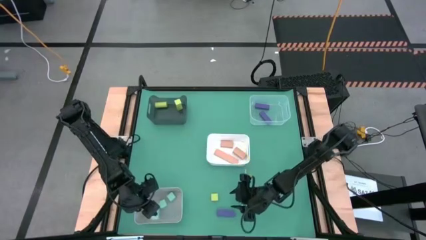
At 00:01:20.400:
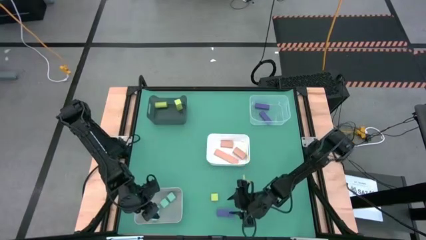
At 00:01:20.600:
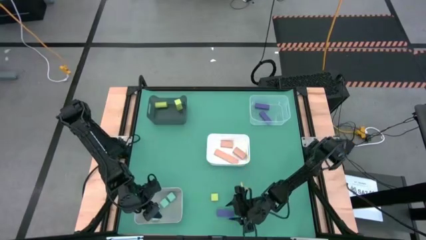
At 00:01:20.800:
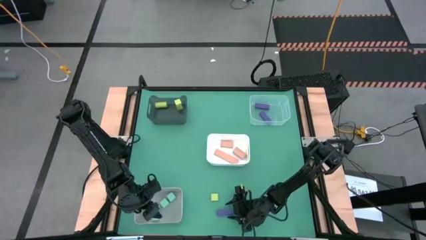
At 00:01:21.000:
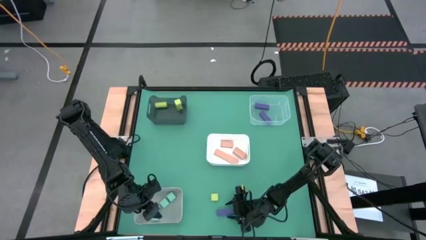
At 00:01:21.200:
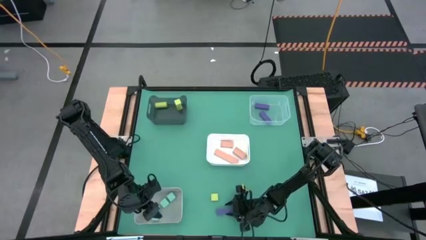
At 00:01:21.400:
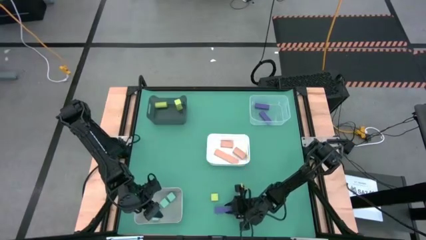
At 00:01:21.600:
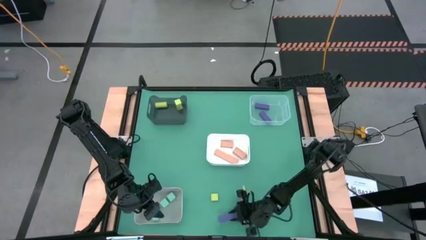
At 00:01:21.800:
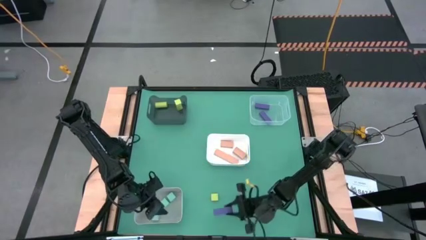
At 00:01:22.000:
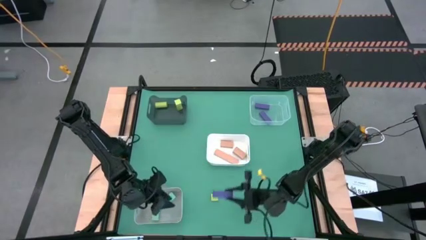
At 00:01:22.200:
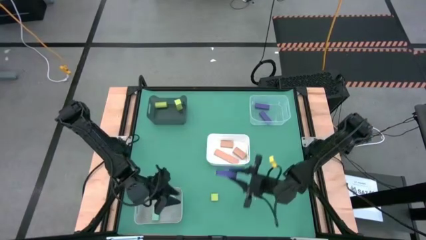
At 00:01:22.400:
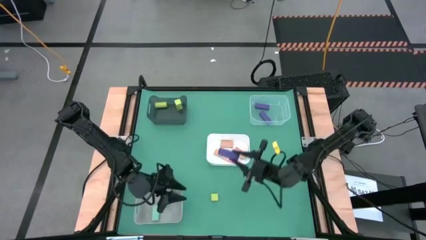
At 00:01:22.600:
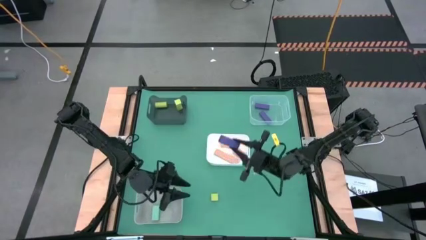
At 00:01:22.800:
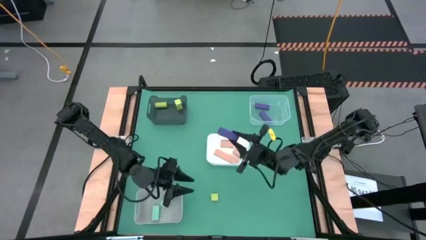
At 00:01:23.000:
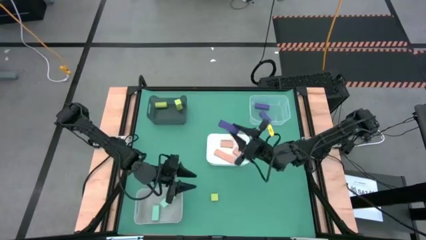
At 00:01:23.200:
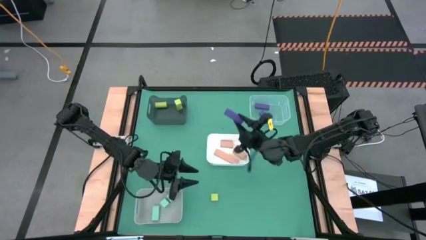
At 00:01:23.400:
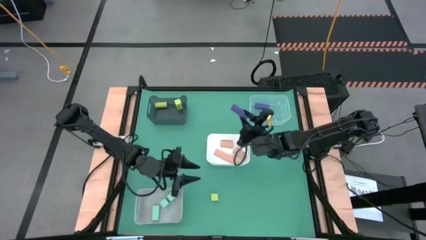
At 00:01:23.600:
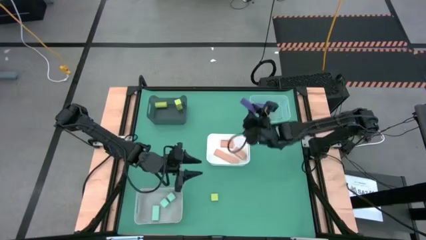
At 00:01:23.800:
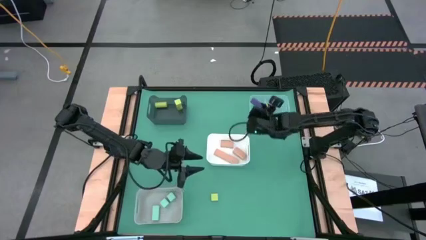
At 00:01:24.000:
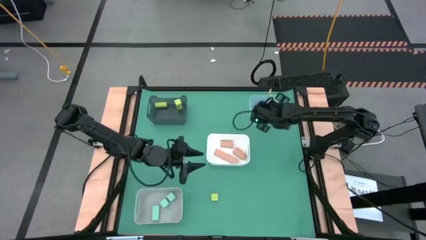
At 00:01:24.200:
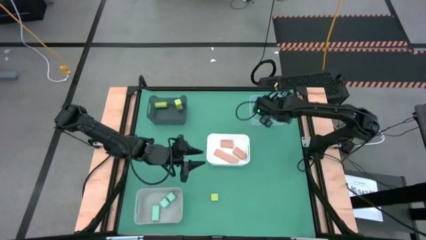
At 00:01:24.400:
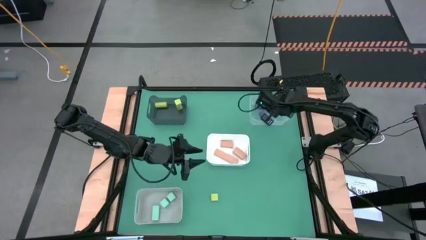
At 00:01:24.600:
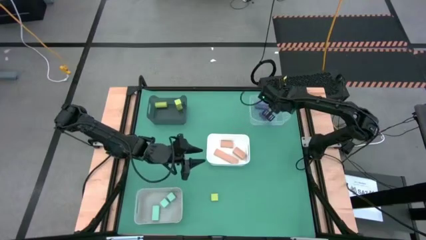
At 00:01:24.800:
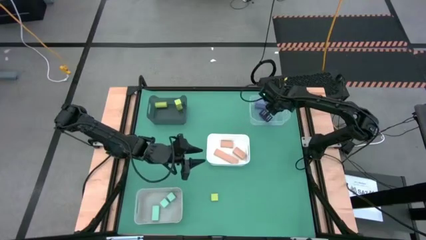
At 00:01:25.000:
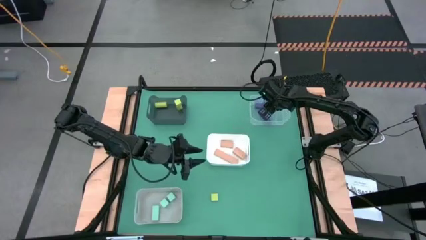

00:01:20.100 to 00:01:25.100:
Task: Sort & place blocks by color
Put the purple block into the transparent bin

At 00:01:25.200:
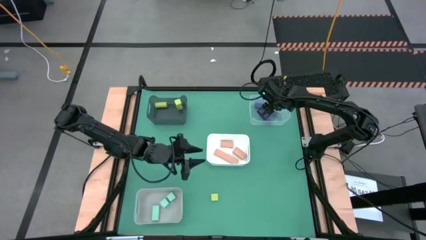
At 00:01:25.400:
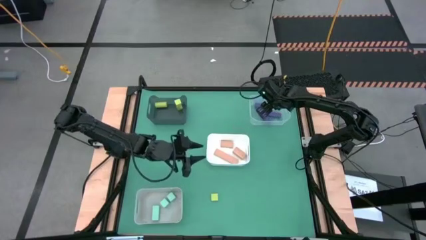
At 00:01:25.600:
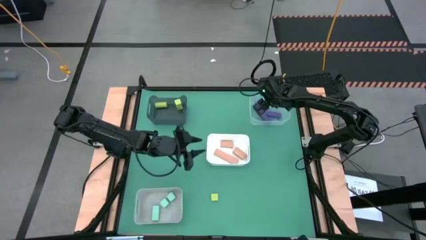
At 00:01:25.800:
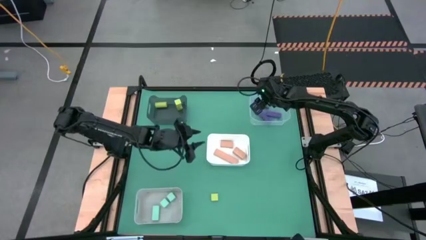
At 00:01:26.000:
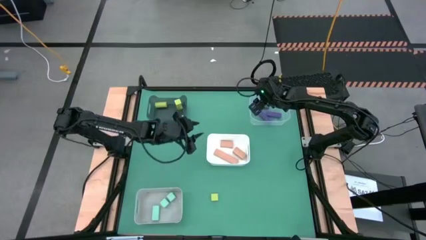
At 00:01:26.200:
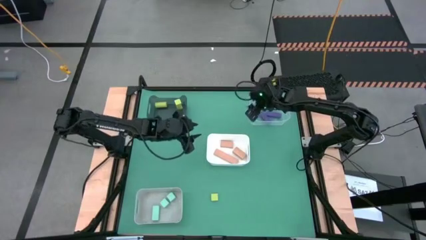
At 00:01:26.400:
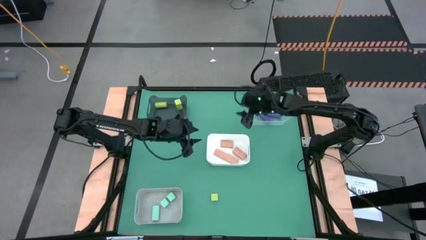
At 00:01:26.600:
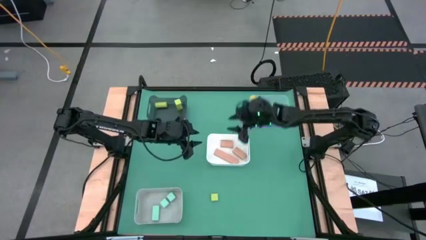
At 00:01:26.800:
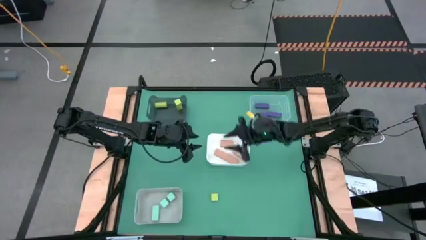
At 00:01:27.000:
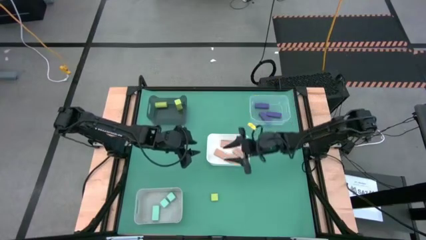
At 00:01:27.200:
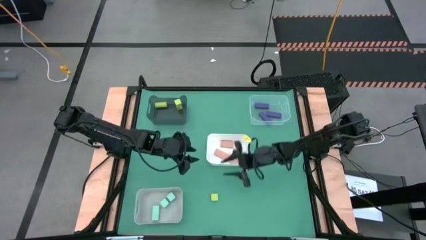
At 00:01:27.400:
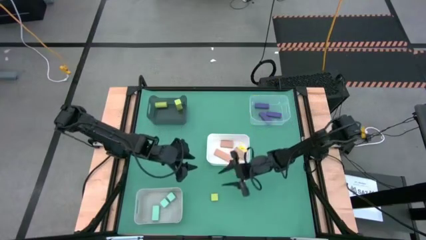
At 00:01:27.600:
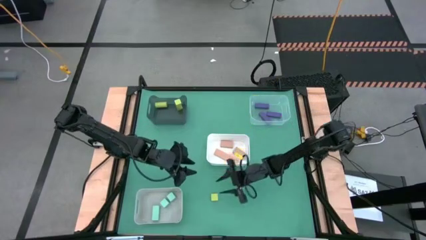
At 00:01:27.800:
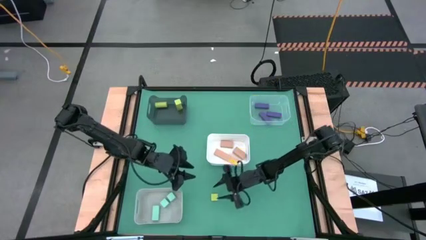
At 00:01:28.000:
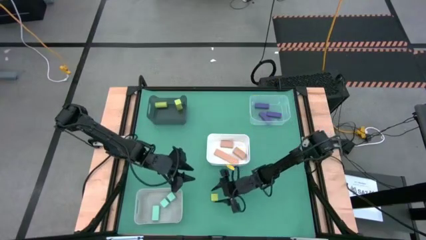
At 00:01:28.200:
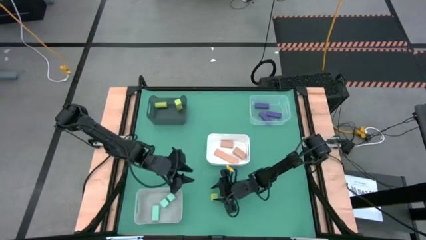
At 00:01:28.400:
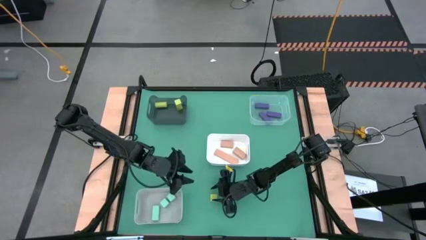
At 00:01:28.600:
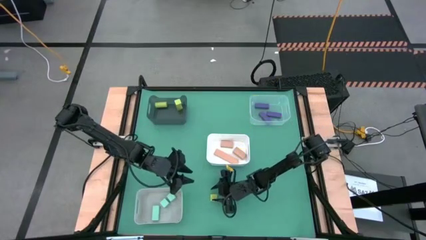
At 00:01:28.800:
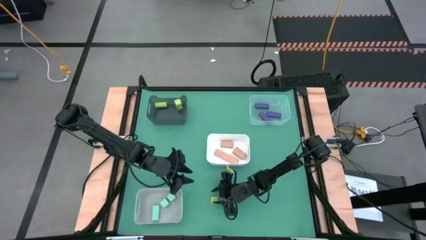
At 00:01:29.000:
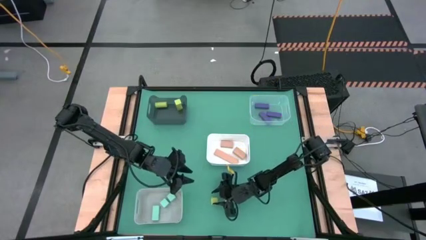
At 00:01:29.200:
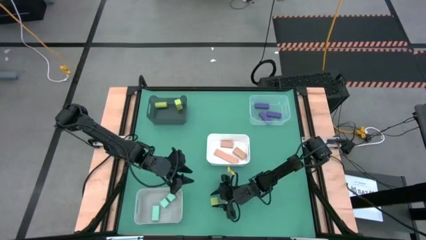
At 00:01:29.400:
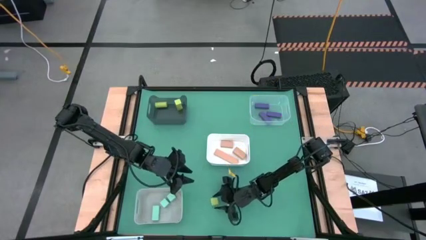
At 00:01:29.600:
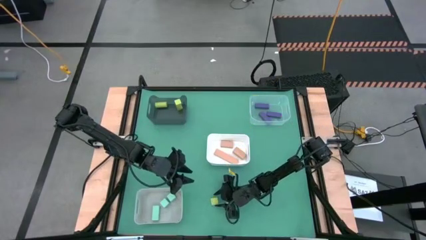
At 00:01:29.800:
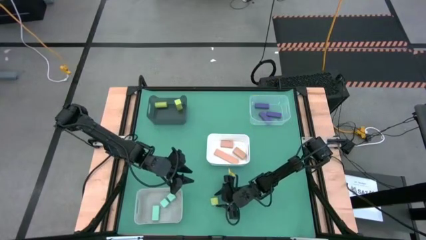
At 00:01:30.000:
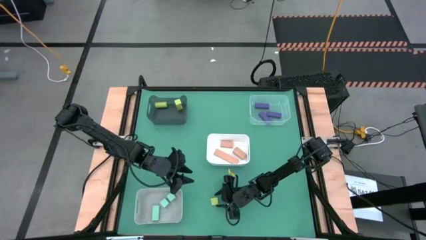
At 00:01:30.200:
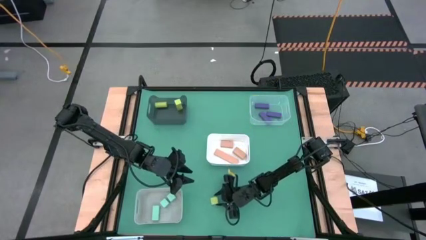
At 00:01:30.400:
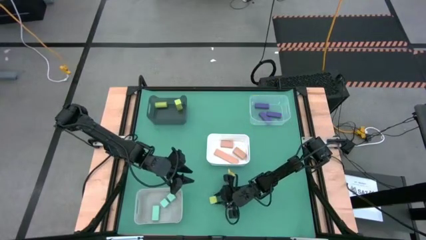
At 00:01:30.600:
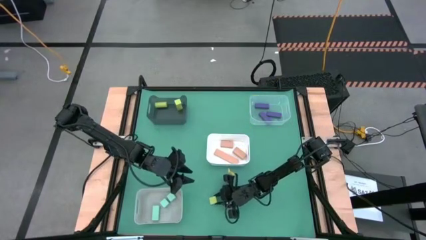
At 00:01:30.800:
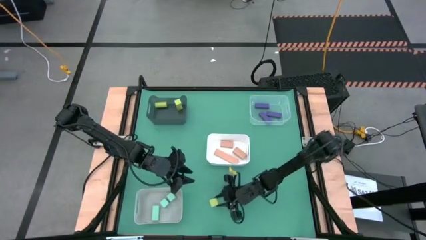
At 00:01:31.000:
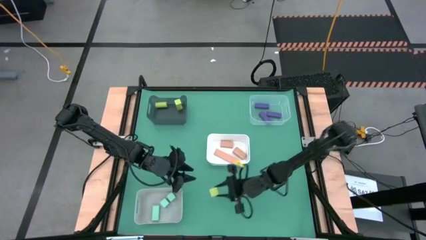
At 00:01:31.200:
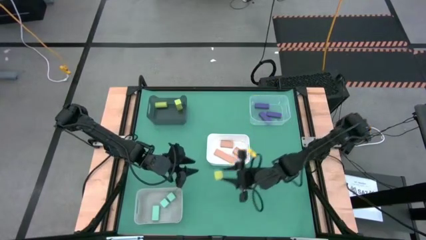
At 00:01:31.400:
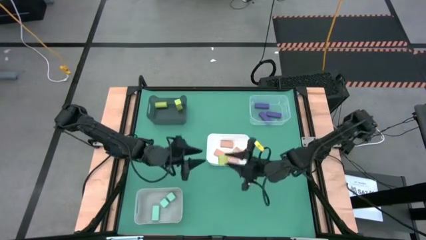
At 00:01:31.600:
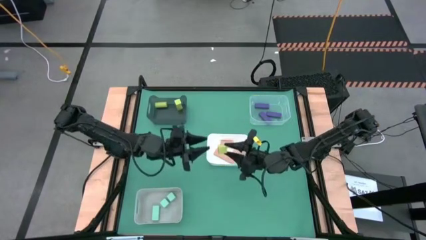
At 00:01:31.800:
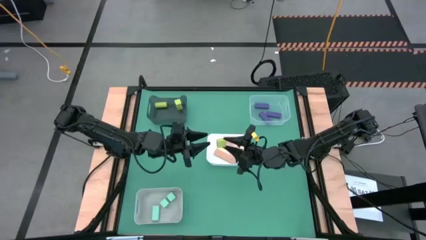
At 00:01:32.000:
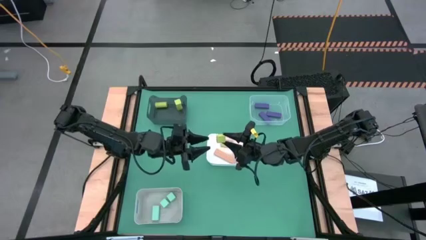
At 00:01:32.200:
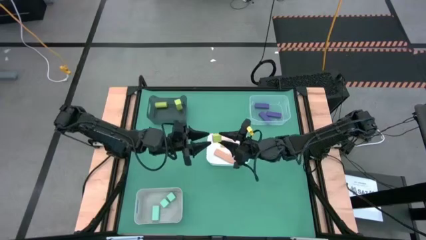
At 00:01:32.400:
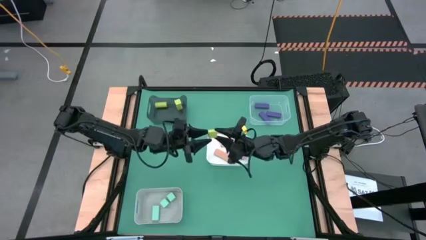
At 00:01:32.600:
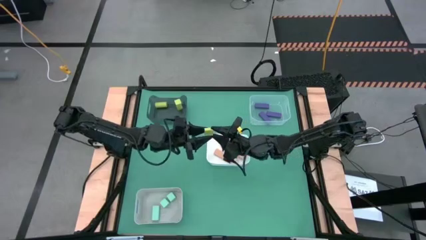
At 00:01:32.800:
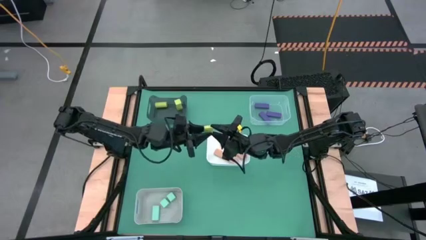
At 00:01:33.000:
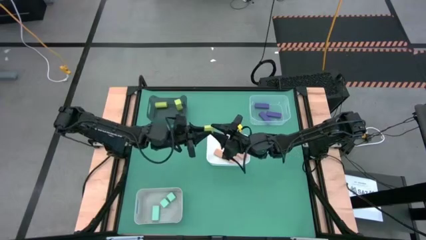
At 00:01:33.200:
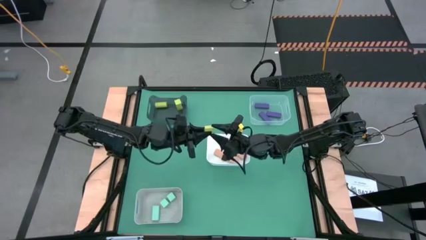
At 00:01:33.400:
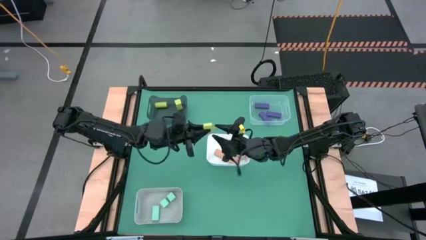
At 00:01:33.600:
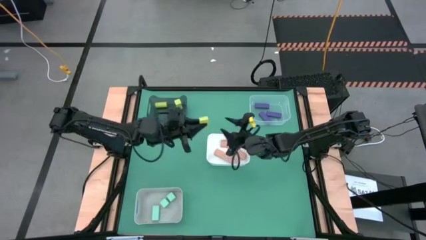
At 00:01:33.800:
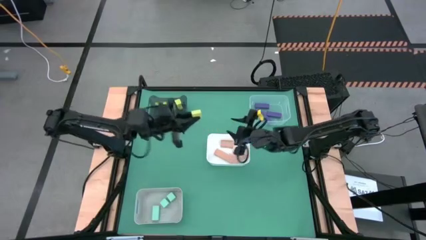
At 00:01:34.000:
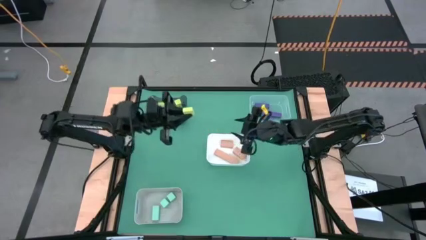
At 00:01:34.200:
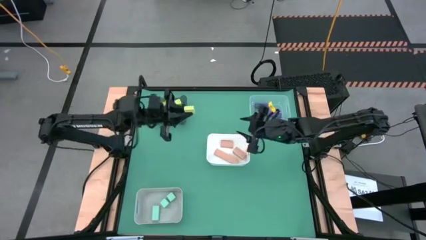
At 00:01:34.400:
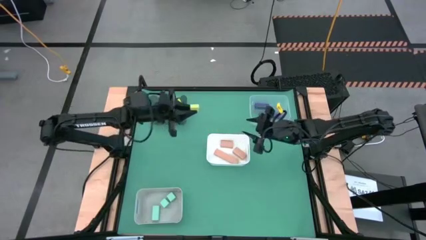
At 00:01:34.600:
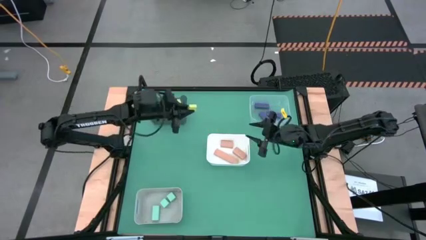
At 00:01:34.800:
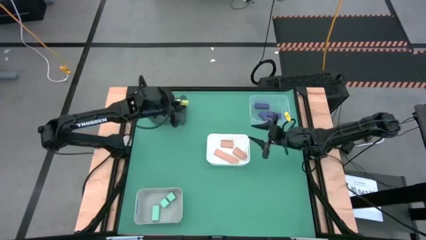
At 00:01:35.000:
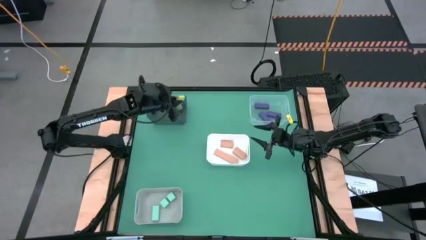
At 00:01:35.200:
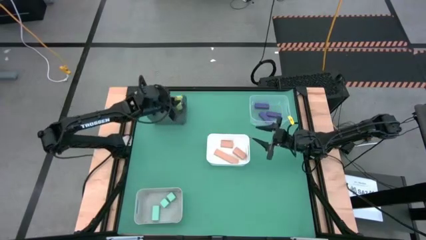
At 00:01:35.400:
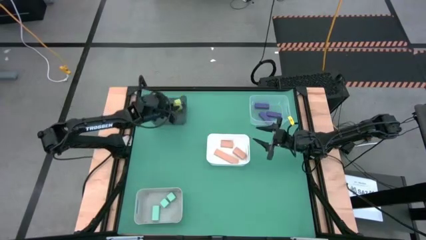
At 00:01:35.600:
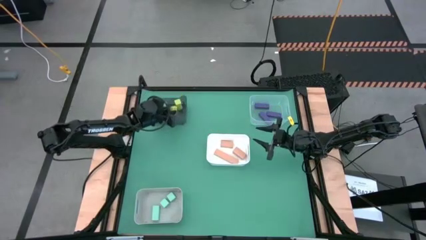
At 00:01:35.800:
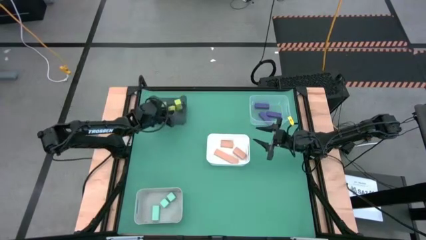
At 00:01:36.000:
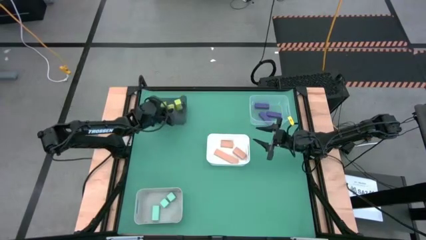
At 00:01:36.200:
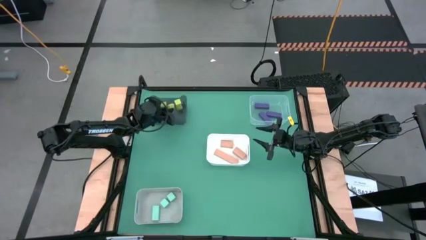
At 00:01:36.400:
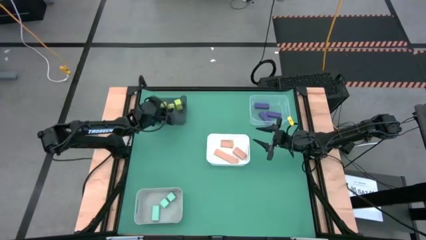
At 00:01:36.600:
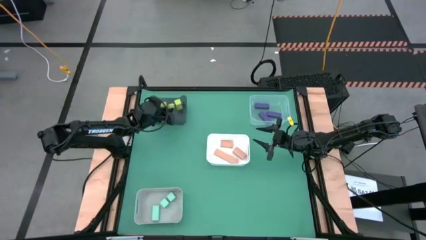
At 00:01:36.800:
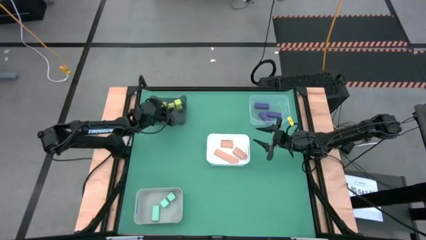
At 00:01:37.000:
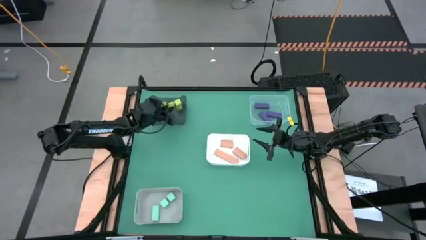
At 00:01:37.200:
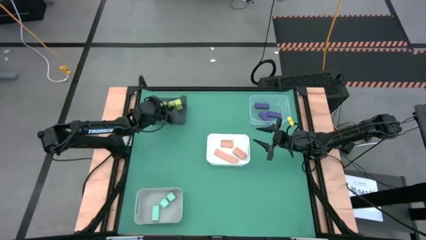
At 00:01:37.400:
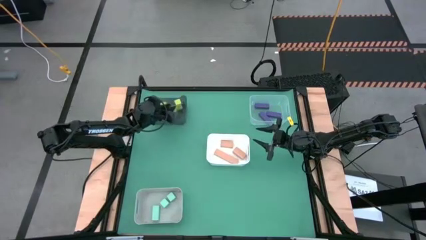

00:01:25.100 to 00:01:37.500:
Put the green block into the black bin
